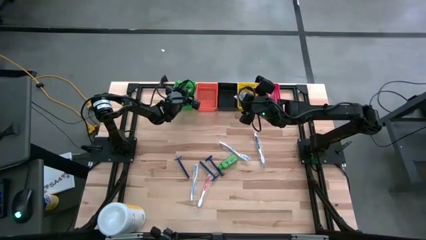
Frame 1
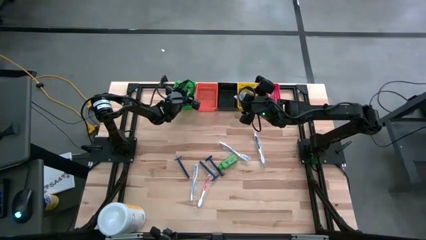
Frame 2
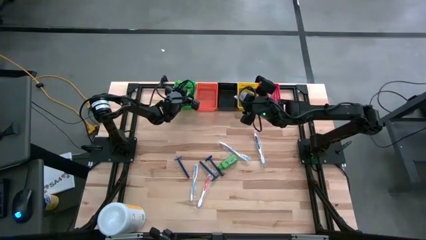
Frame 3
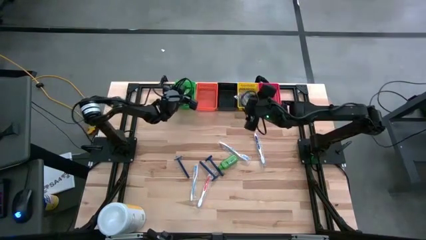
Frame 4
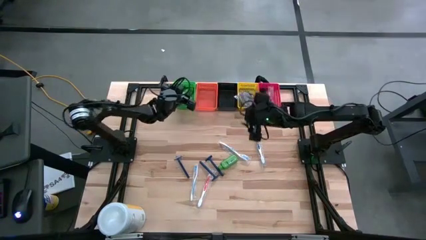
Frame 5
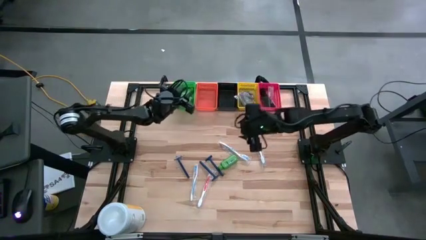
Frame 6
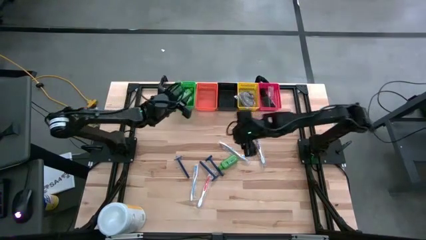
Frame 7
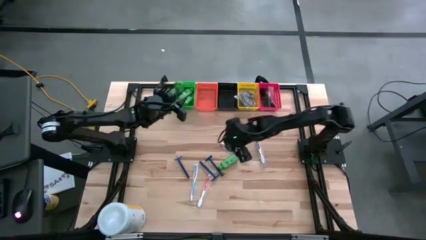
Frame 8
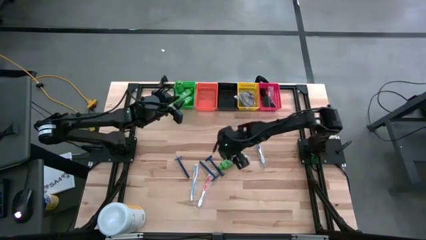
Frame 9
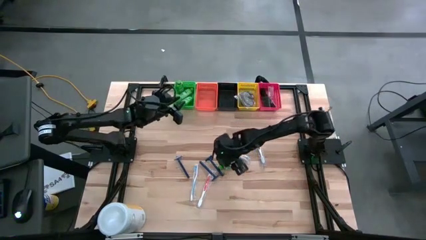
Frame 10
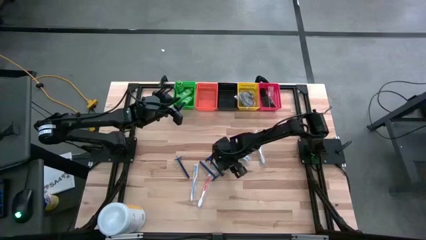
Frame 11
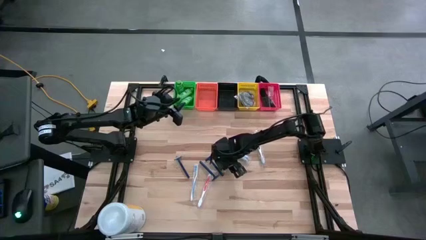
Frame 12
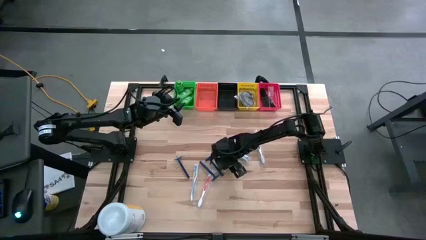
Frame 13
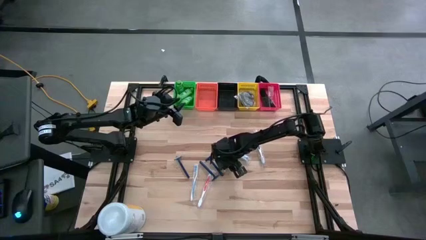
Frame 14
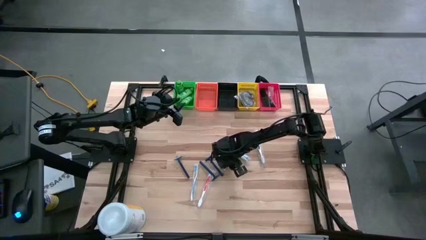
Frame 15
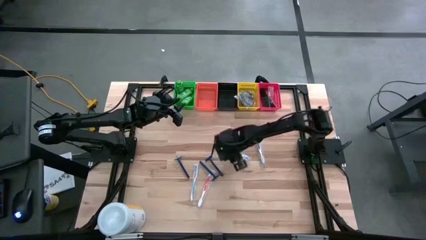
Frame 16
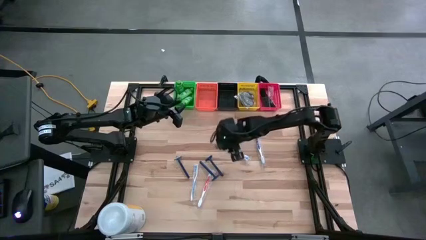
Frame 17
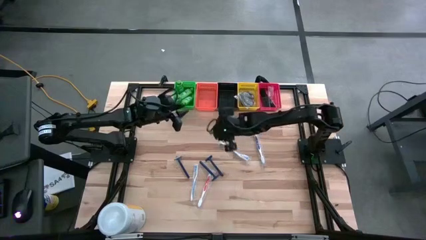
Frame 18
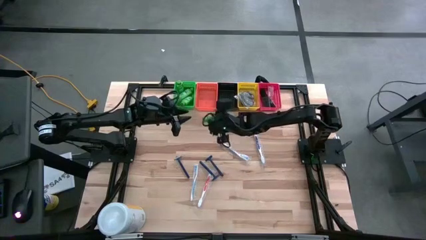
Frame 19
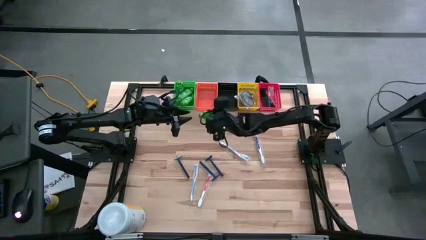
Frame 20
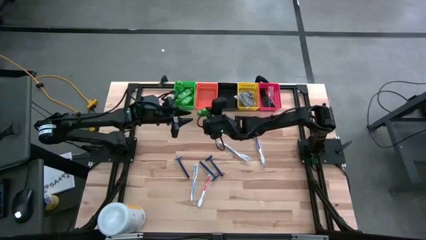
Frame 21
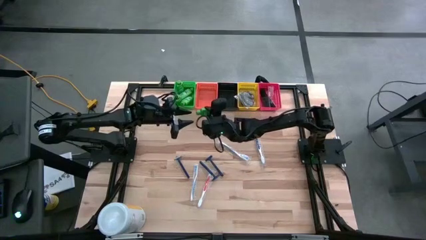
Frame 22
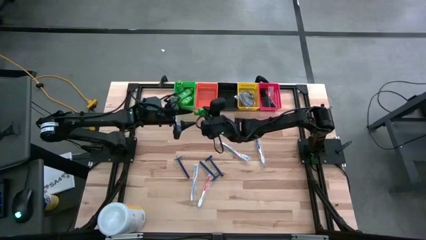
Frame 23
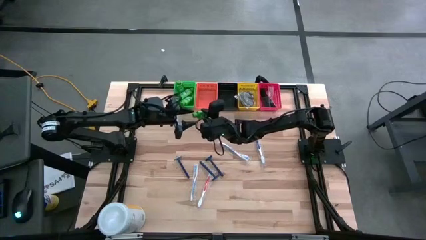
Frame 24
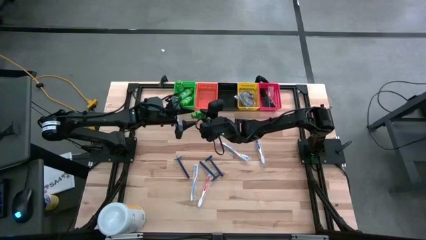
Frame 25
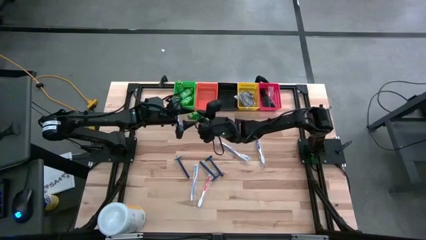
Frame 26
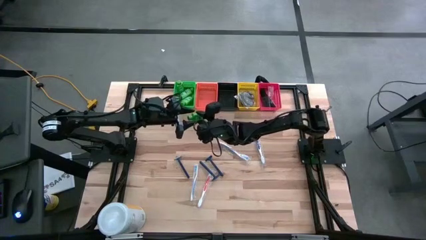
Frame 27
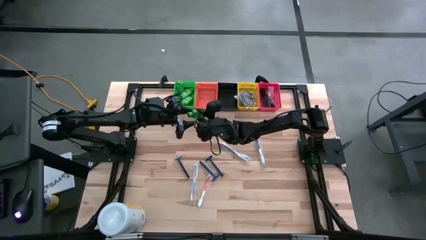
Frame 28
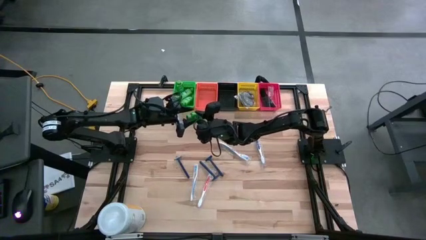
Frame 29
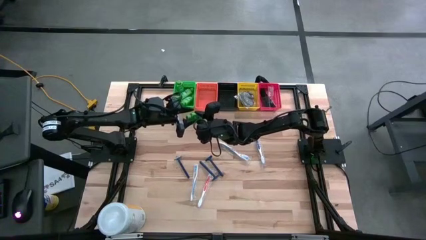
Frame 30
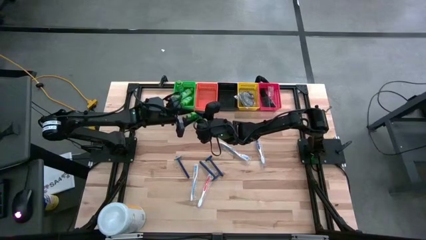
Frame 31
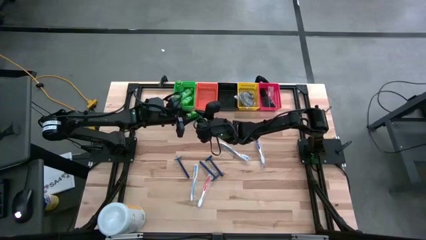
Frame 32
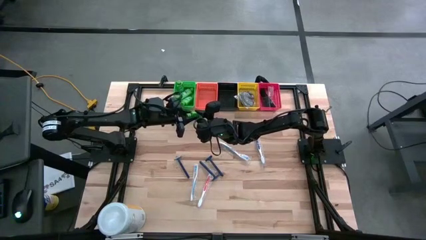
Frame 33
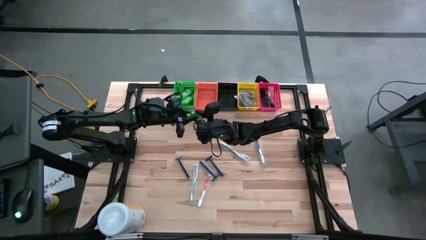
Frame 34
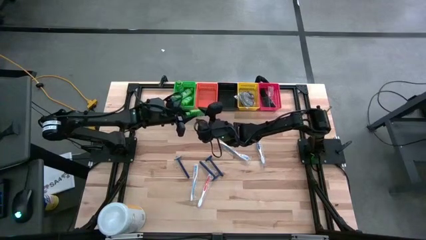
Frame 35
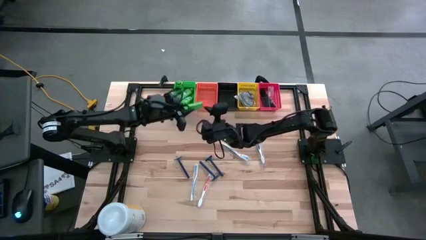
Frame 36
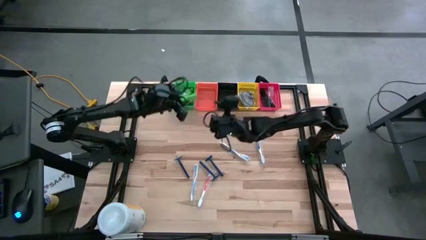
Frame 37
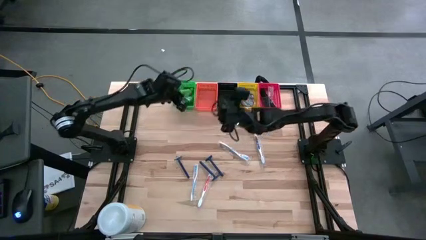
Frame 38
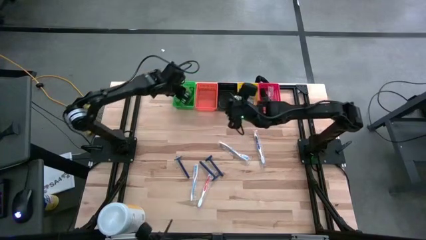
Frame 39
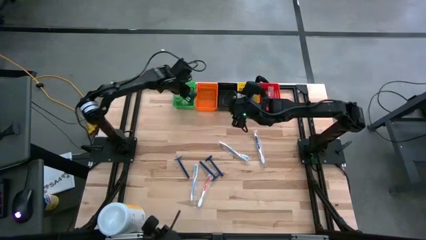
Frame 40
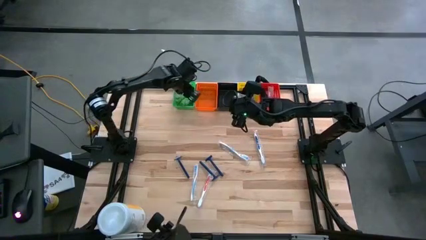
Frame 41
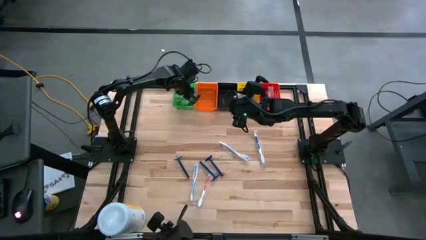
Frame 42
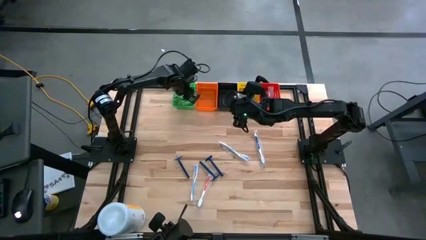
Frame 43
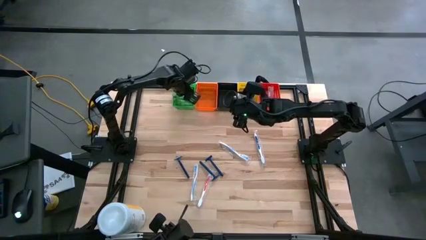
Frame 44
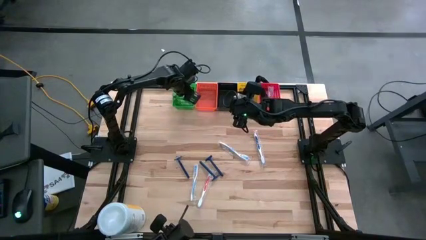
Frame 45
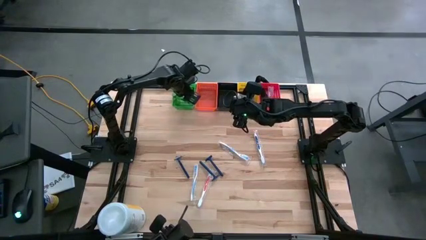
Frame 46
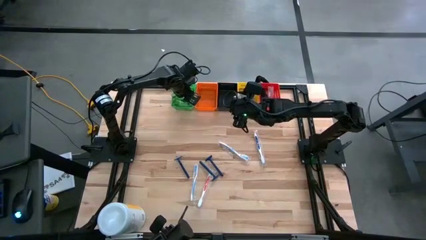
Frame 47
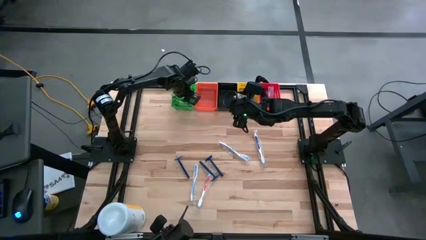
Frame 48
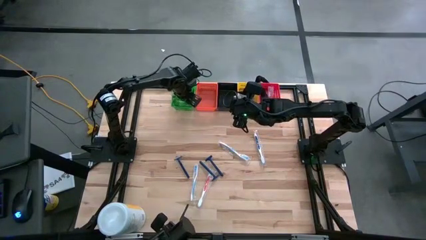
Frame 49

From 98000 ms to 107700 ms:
Task: Pick & Place Travel size toiletries
Put the green shampoo bottle into the green bin

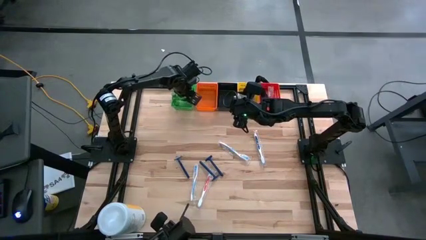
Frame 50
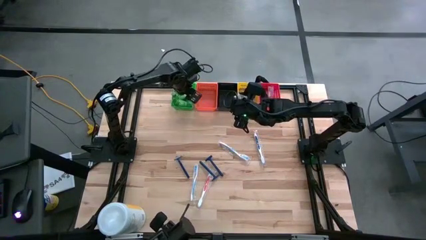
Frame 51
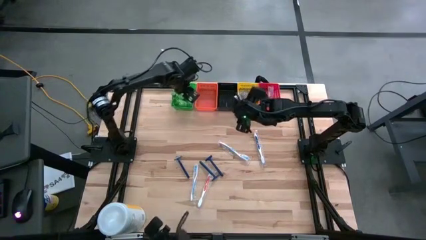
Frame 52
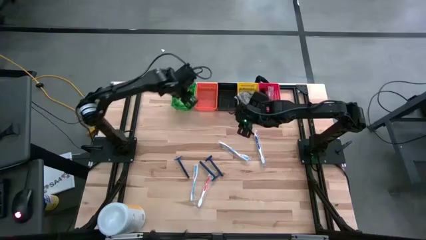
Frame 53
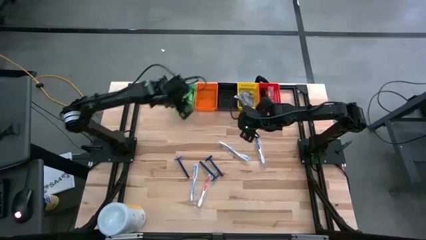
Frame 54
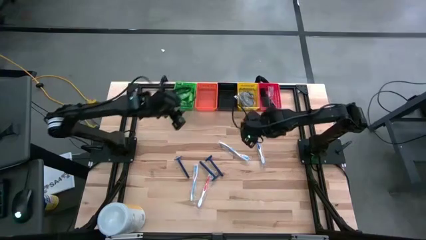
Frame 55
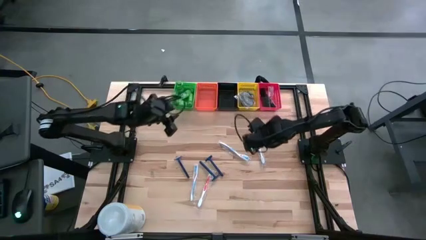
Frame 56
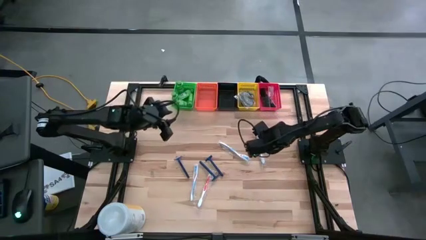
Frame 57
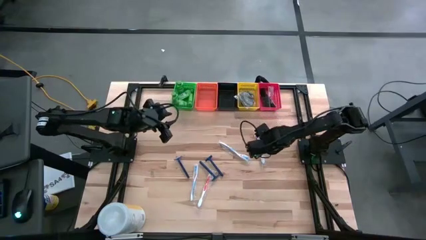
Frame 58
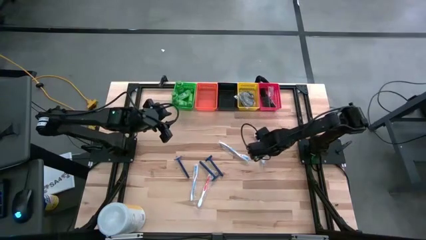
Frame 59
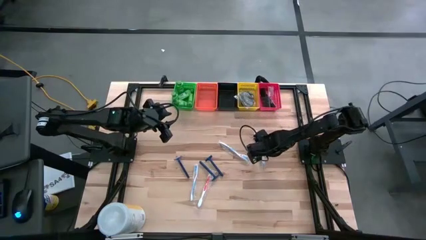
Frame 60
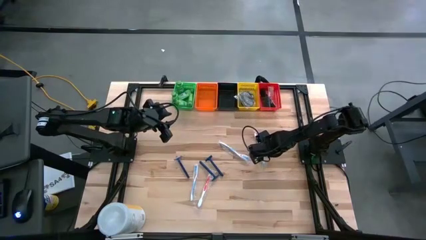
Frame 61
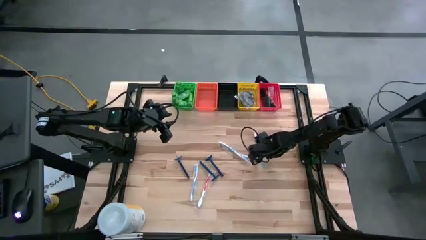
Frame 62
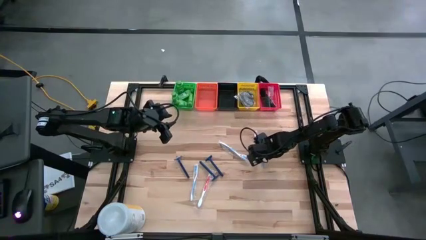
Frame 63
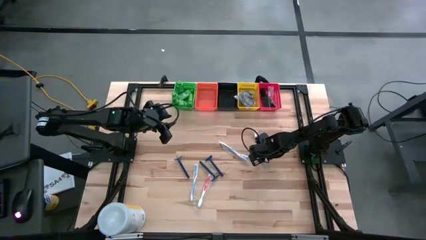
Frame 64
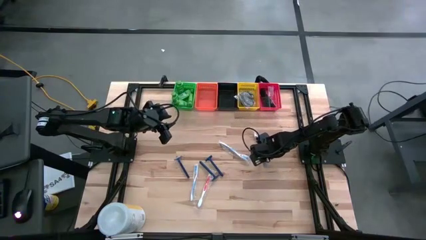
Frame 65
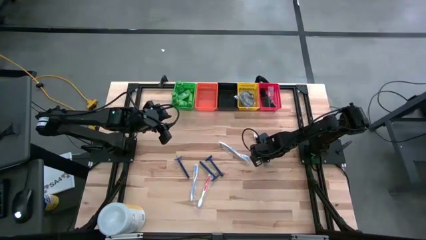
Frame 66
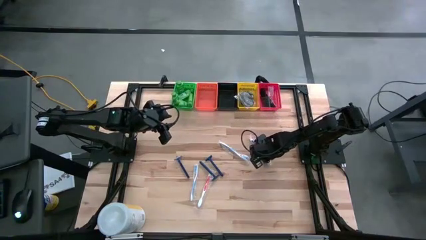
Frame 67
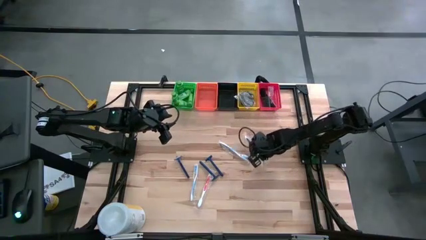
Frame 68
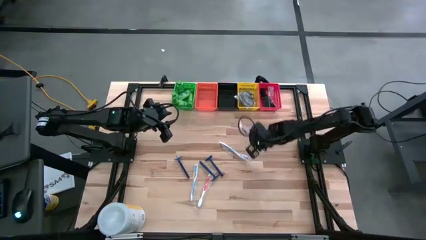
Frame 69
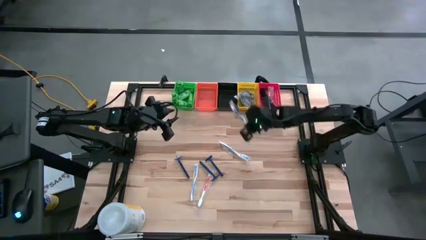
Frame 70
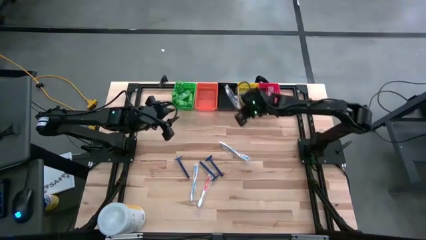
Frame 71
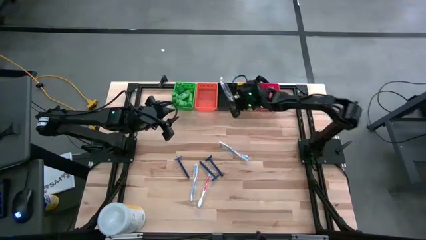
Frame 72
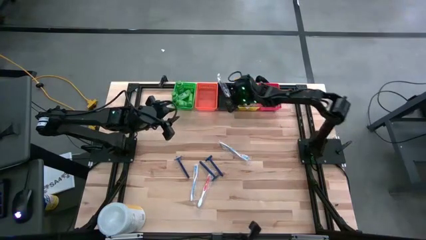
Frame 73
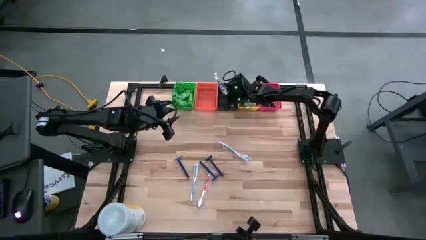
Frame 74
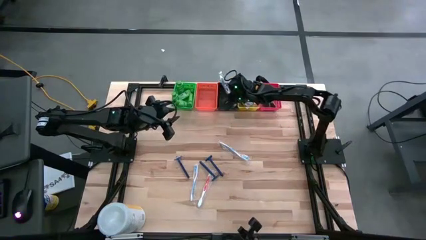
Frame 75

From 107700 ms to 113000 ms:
Put the blue toothbrush into the black bin

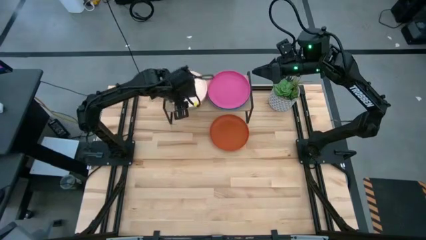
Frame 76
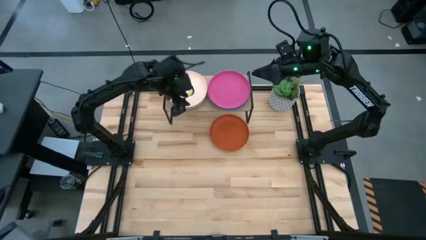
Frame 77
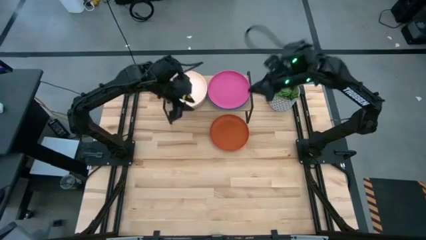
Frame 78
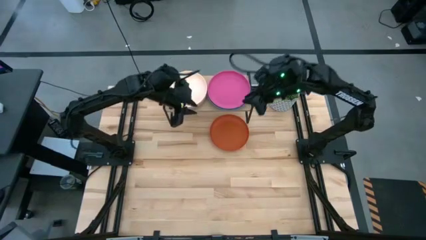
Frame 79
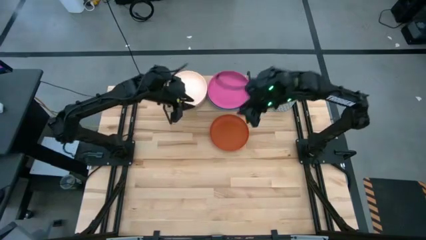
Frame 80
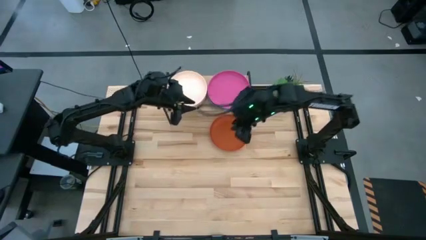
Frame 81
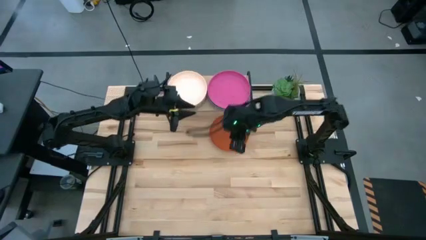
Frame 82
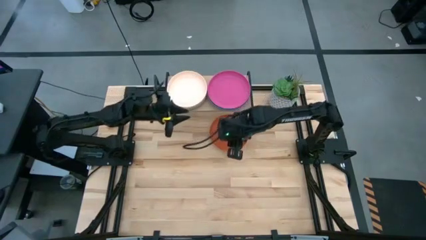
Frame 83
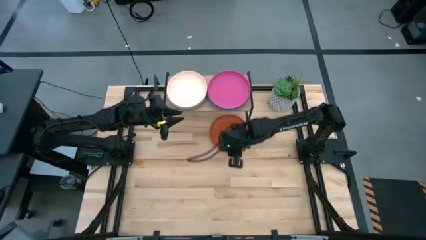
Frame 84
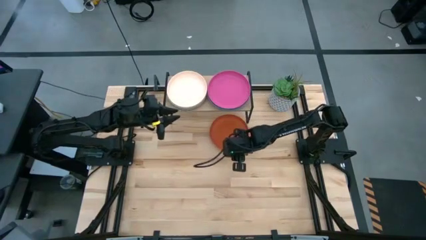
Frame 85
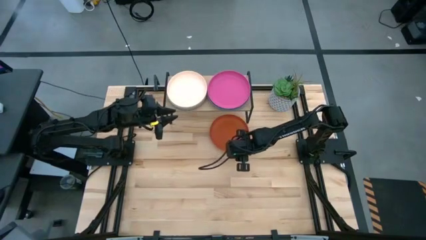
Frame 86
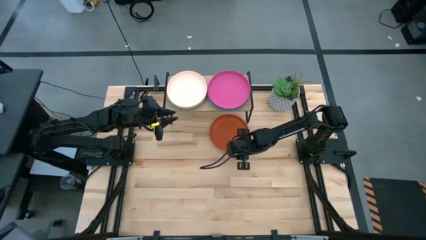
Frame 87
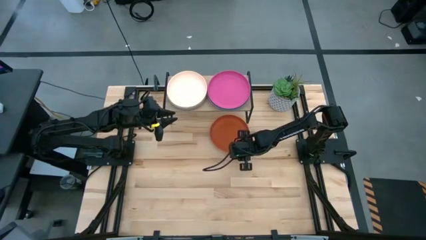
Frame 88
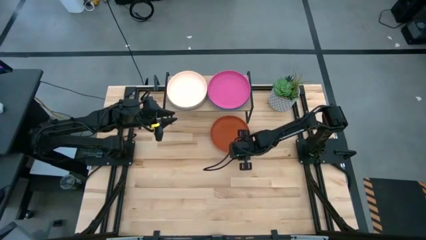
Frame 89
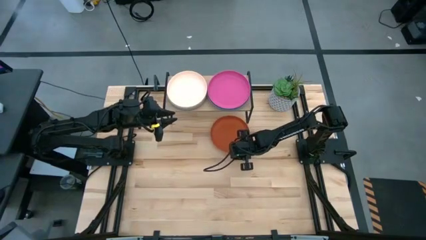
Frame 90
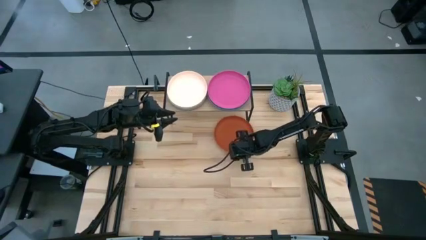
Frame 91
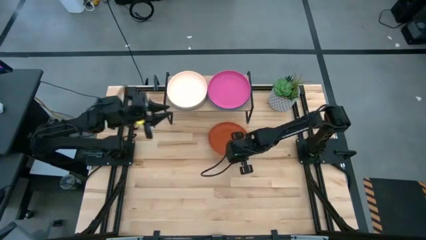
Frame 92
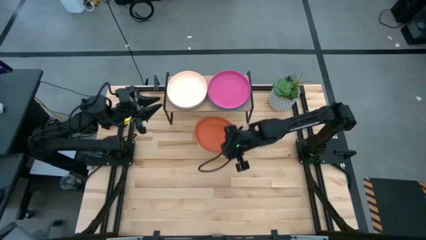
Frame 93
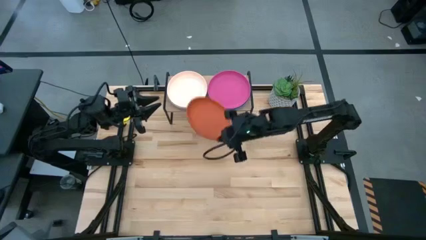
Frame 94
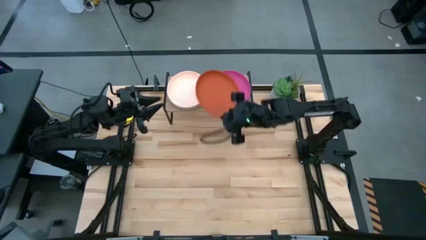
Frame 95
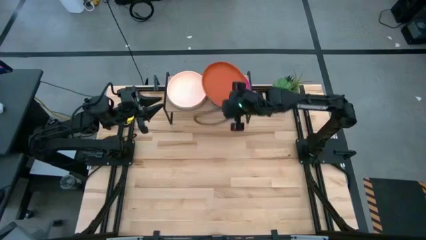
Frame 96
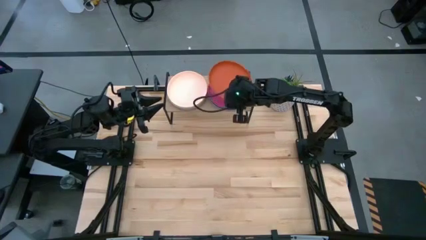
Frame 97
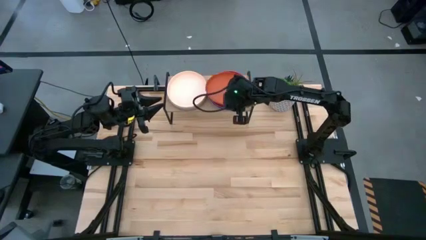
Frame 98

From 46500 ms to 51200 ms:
Task: Place and stack plates onto a shelf
Stack the orange plate on top of the pink plate on the shelf
